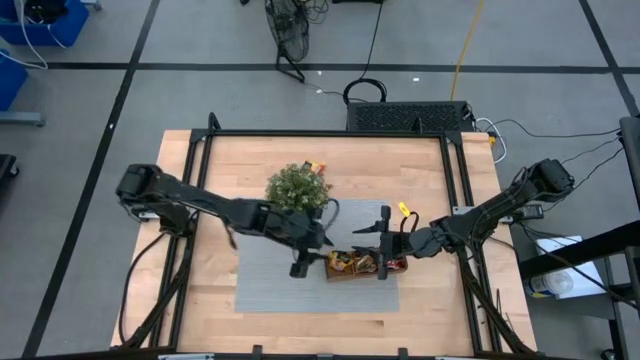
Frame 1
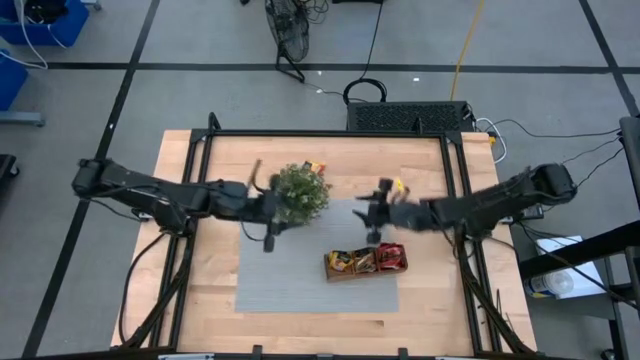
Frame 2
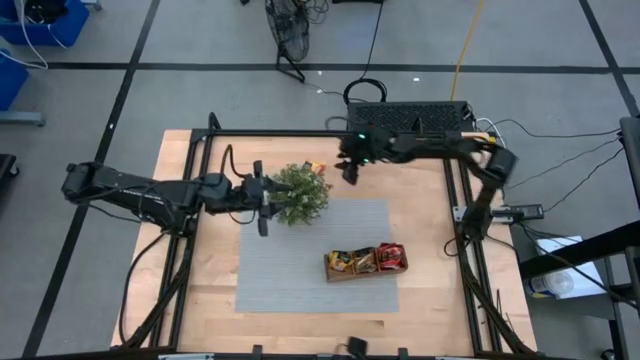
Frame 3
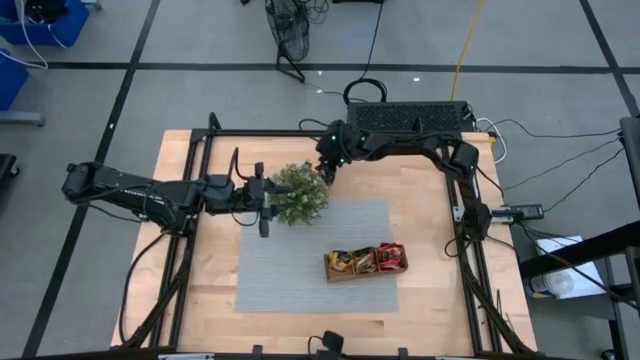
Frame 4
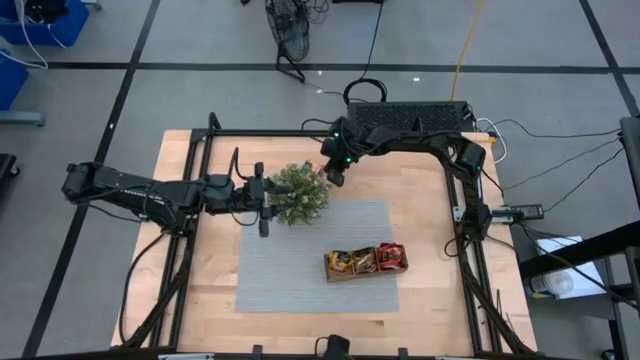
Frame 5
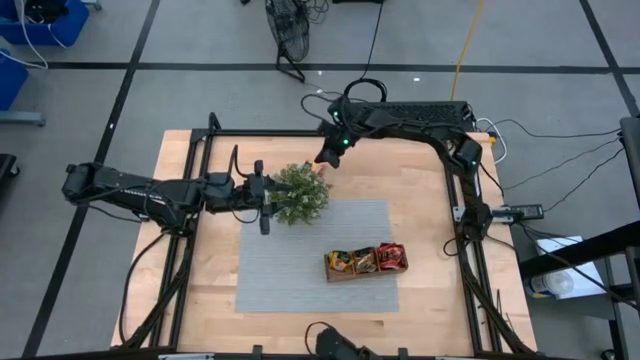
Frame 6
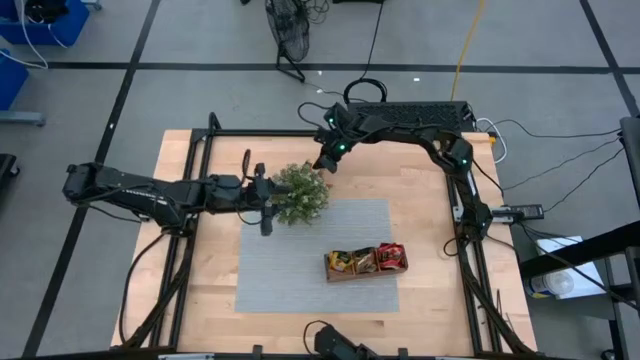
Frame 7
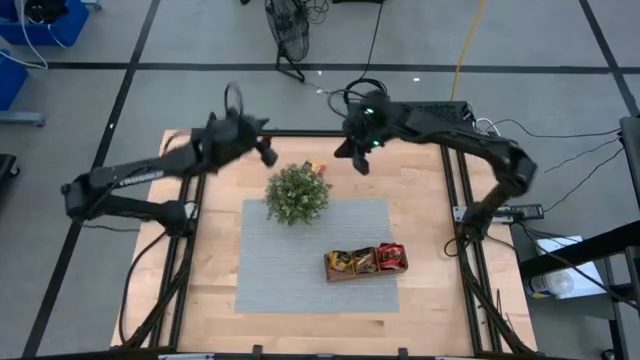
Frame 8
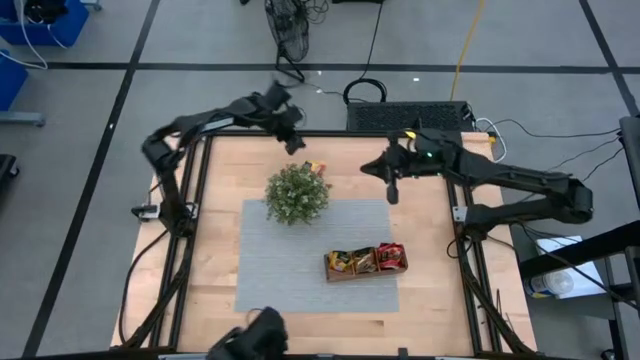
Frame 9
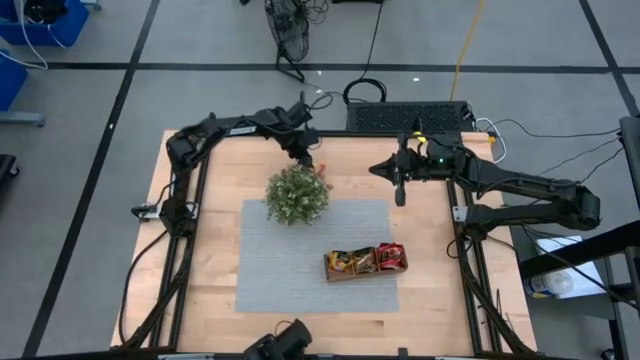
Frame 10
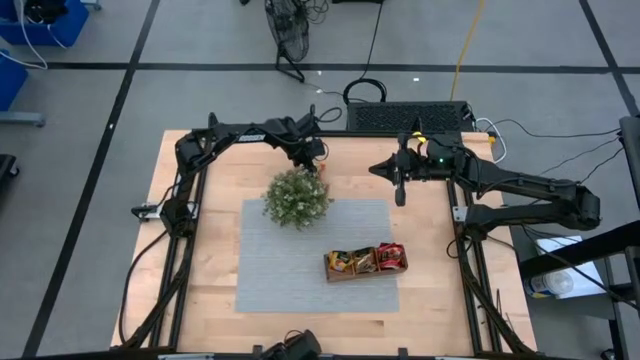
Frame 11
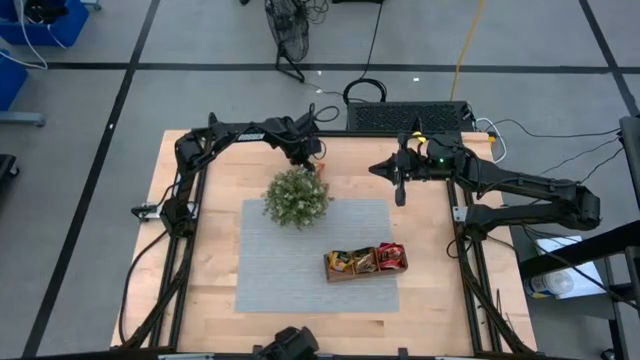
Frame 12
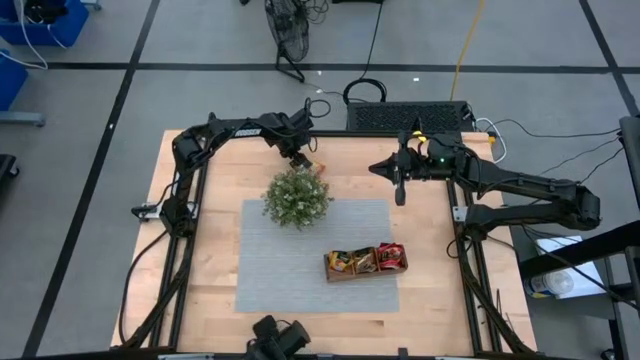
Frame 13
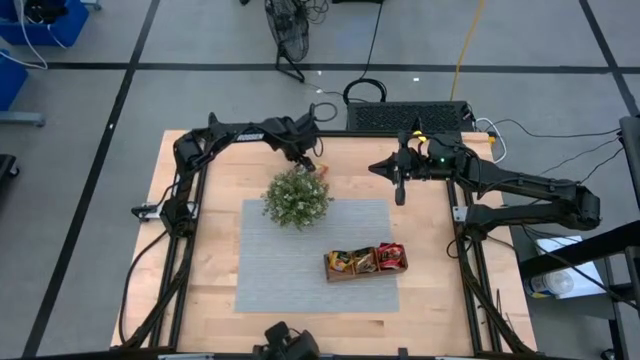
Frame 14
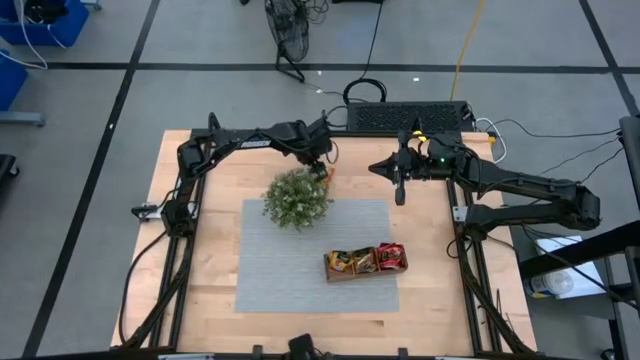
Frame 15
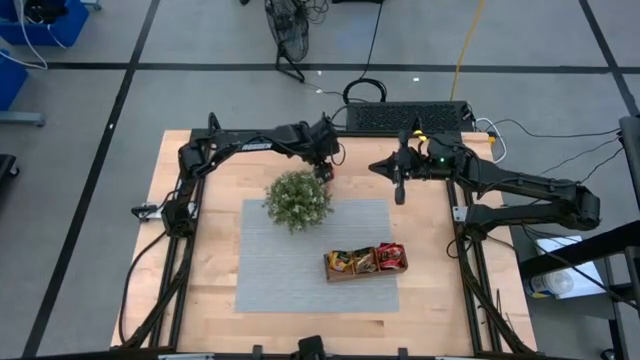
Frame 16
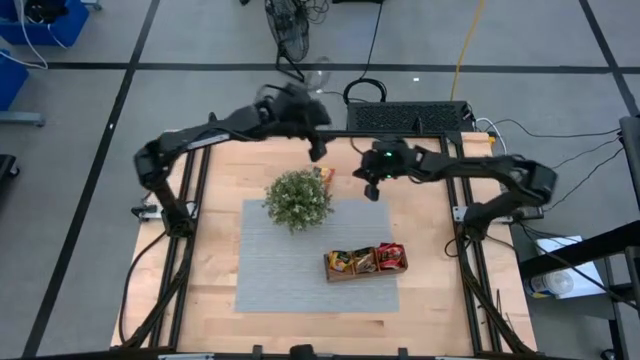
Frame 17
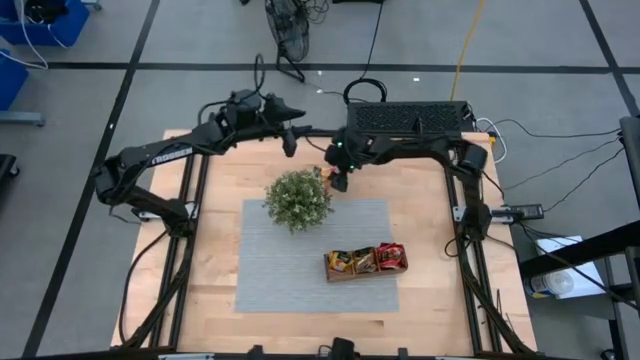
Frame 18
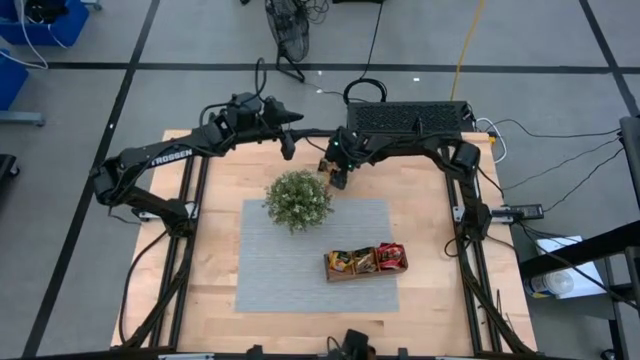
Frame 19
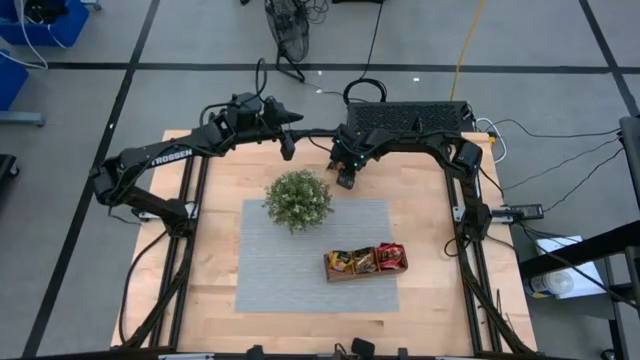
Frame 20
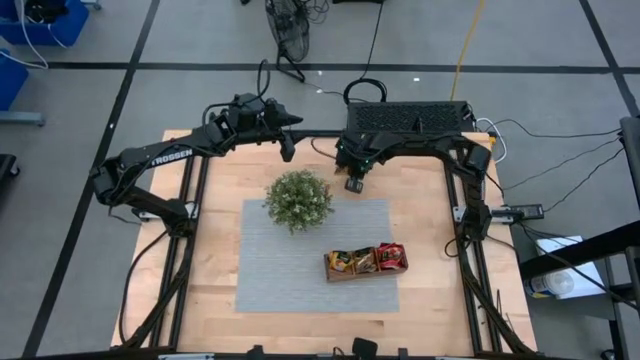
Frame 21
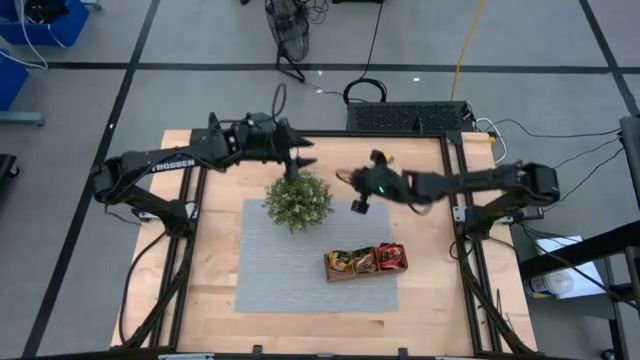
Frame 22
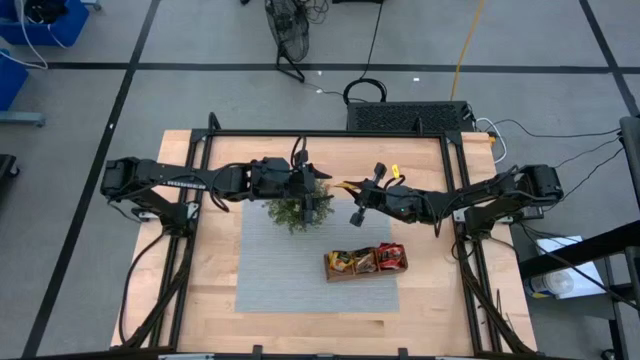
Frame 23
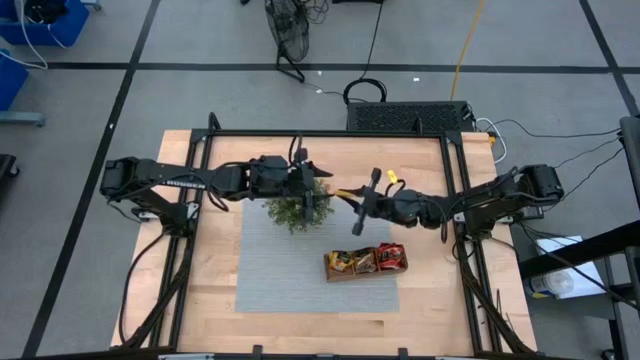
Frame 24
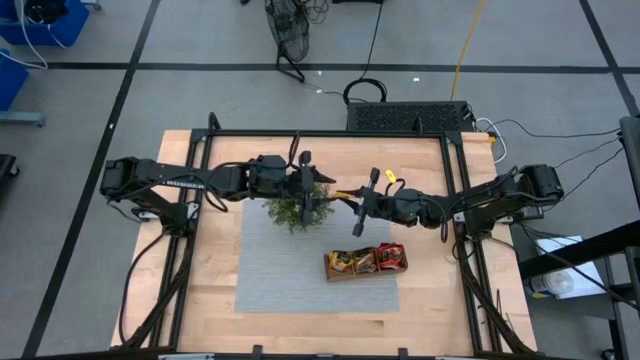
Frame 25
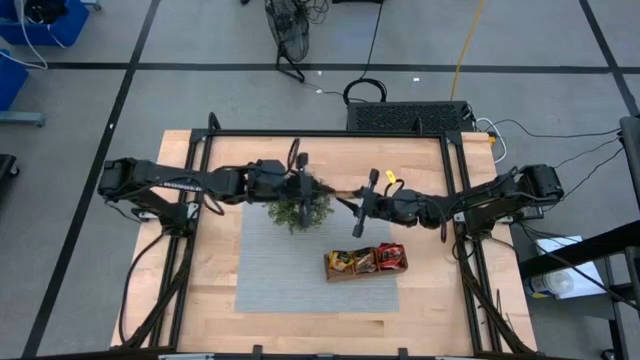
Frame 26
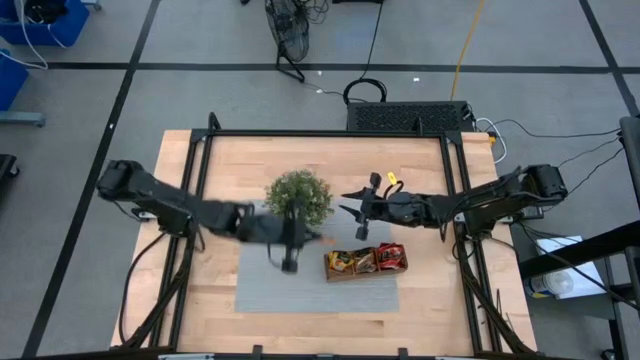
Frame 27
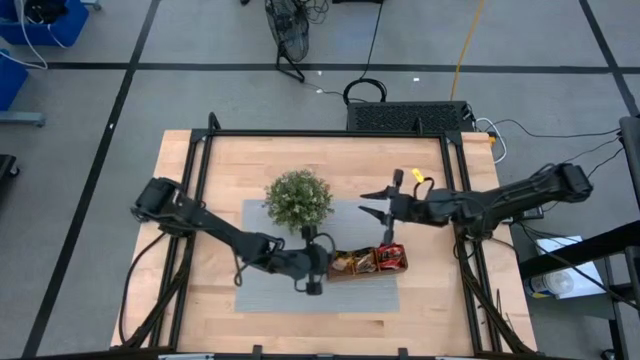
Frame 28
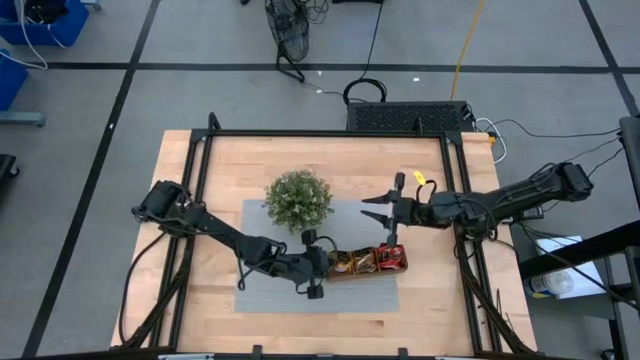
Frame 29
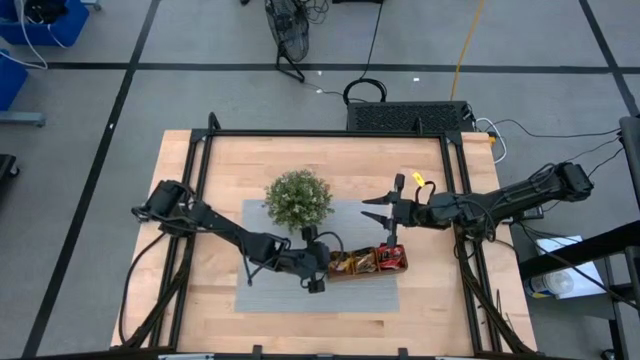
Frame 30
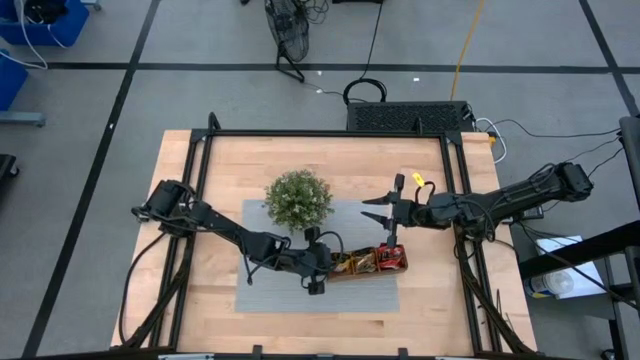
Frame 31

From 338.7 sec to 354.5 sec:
Task: Pick & Place Tea
Put the mango tea sachet into the brown organizer

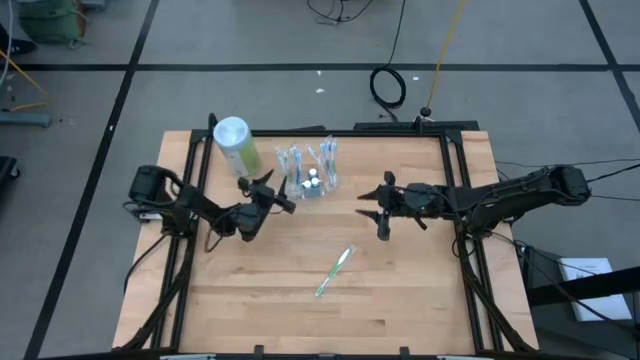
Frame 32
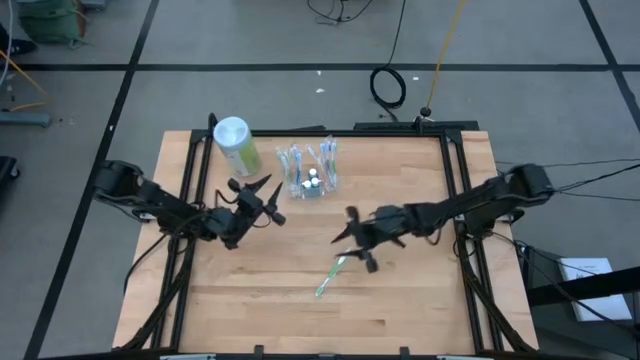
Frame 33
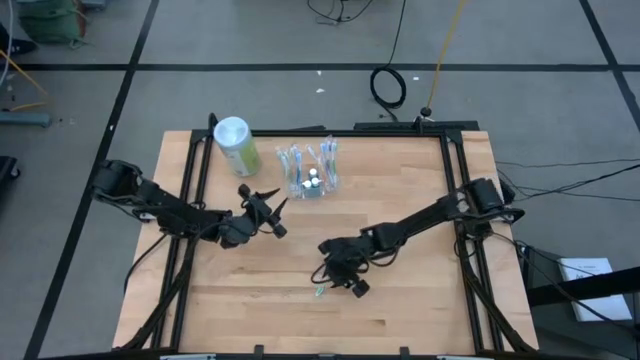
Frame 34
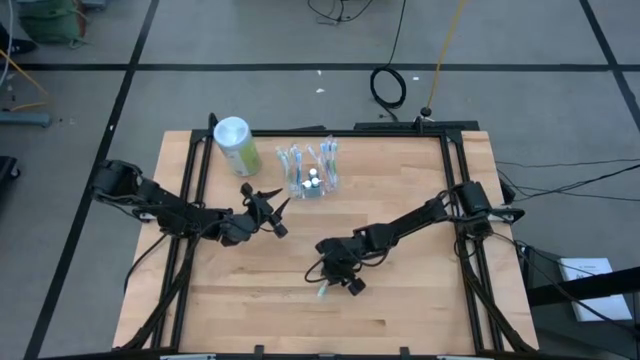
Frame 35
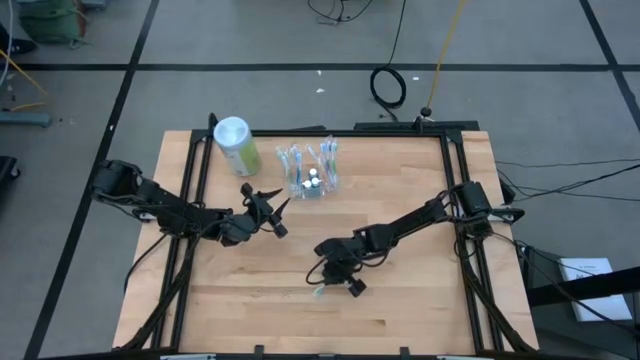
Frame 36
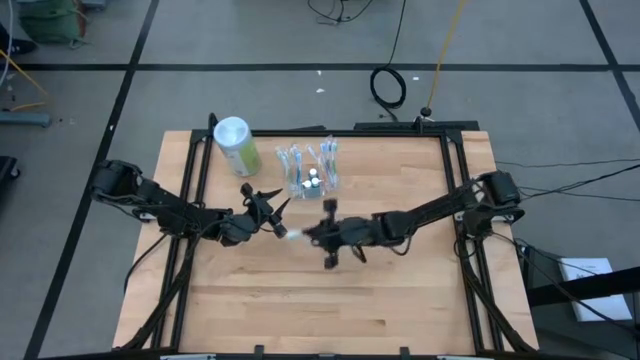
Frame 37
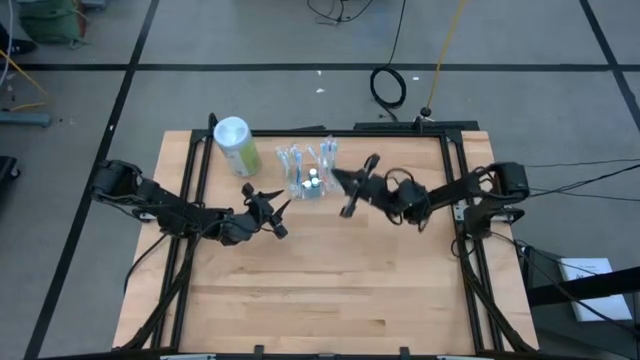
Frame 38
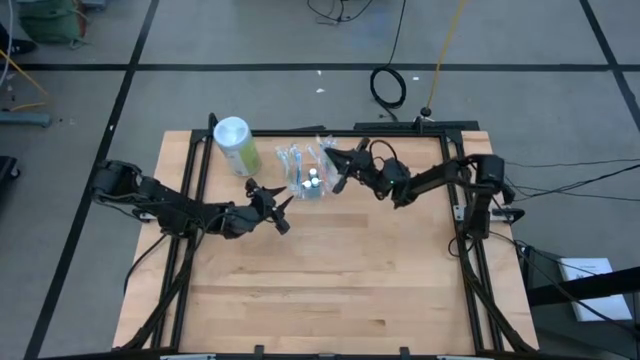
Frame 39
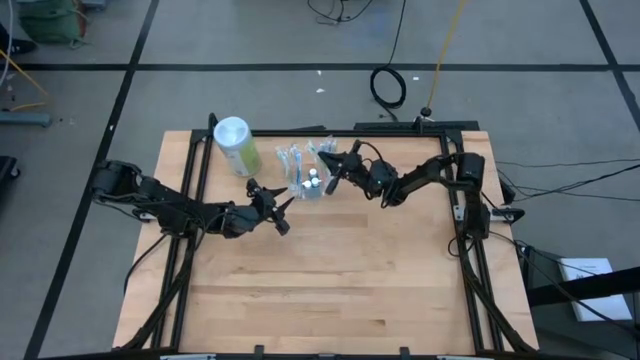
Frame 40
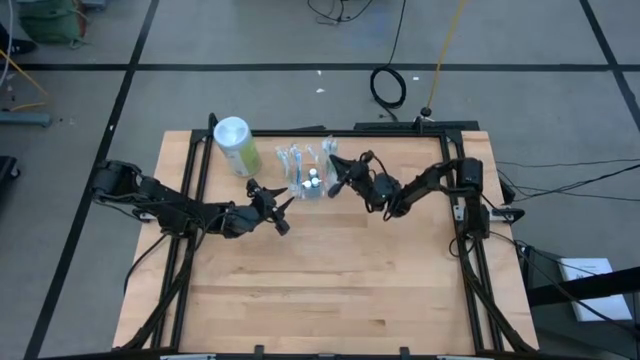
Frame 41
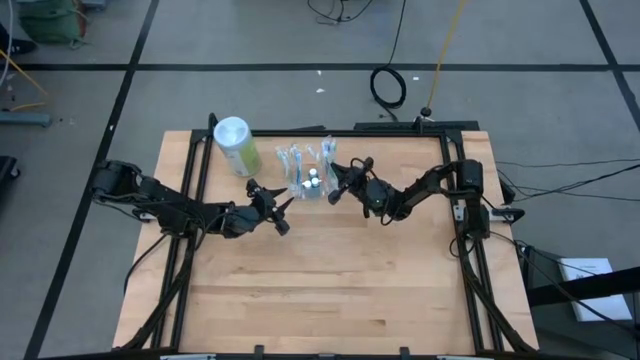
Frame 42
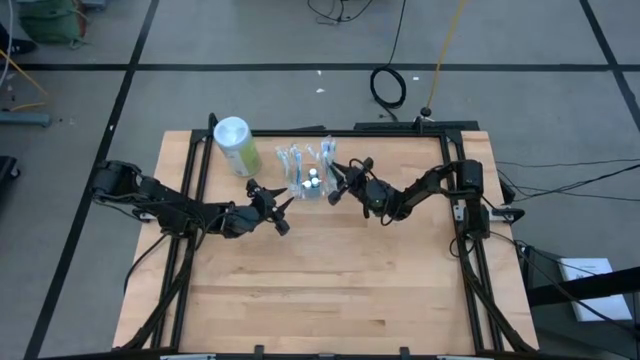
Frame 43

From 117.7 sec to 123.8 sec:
Task: Pick & Place toothbrushing station
Put the green toothbrush into the transparent organizer
